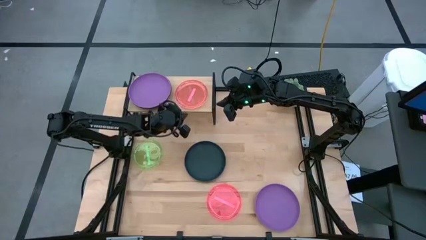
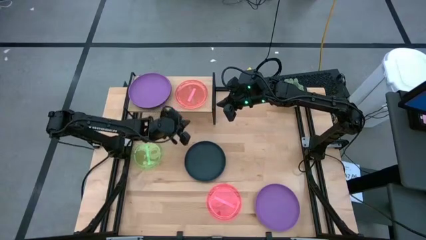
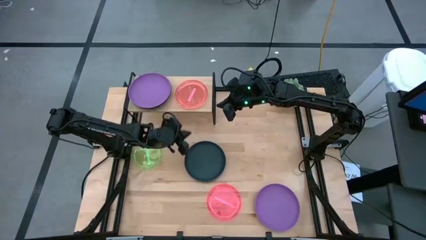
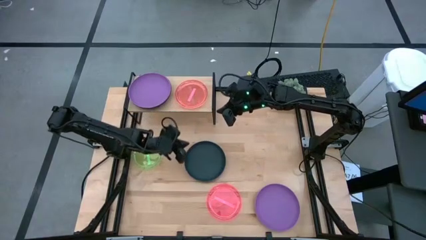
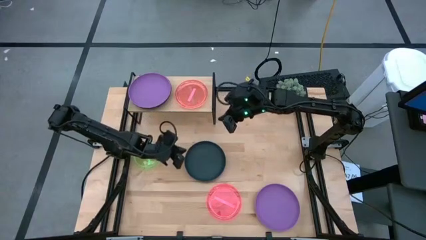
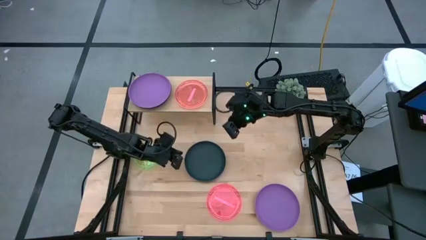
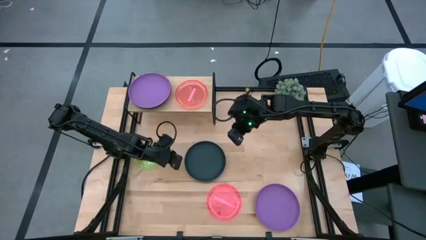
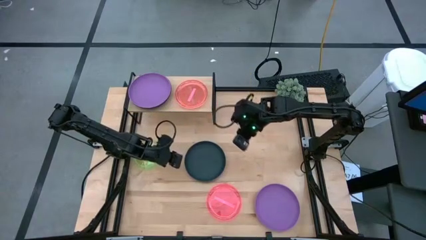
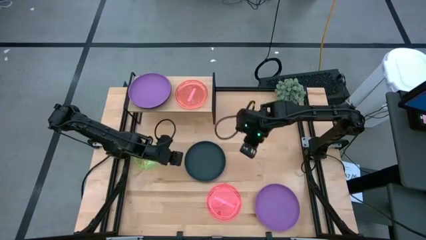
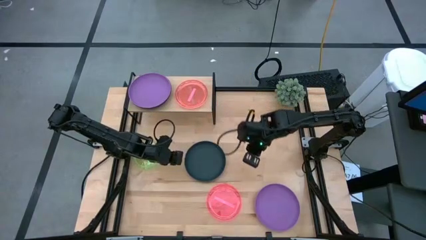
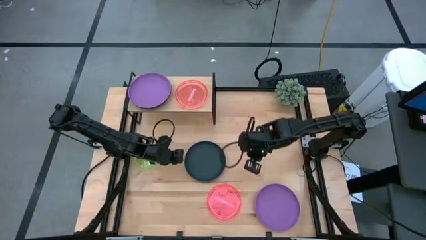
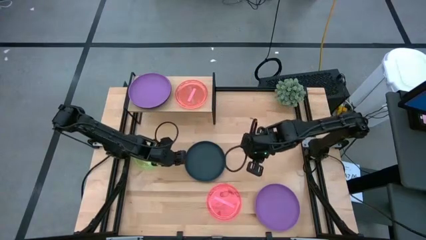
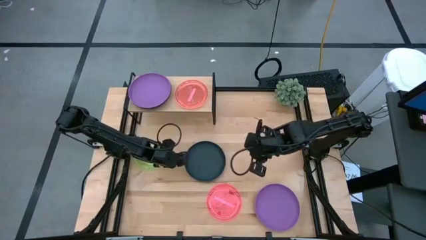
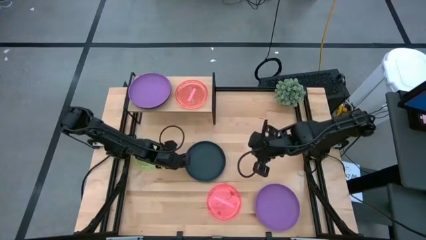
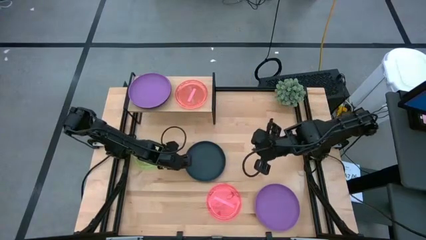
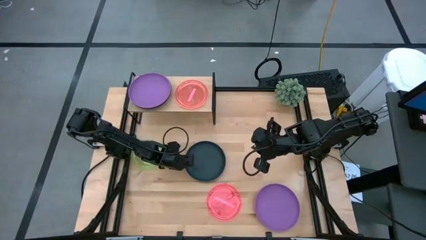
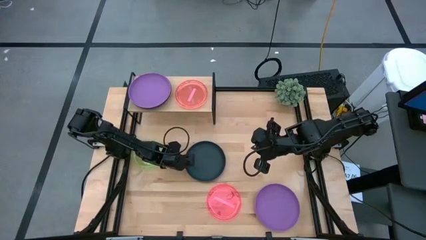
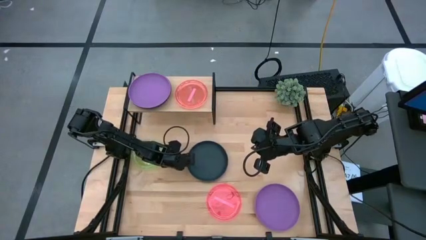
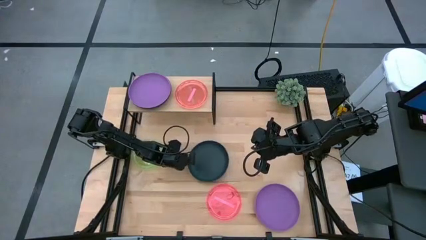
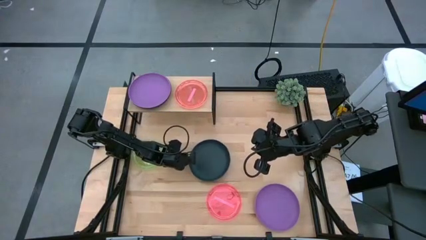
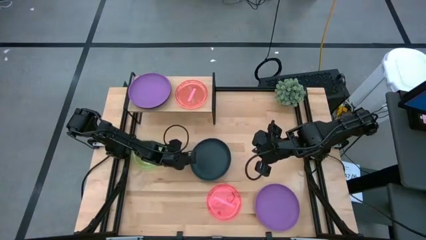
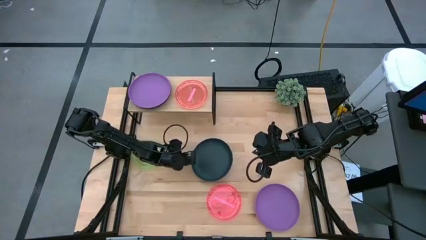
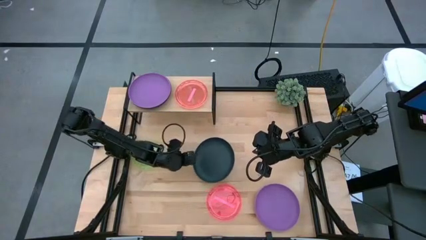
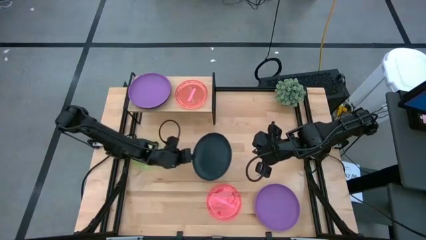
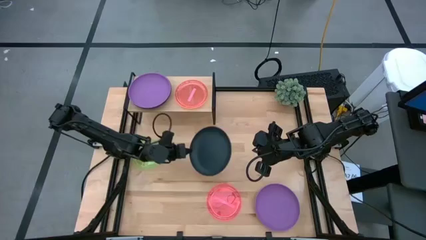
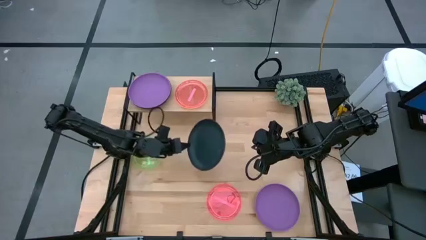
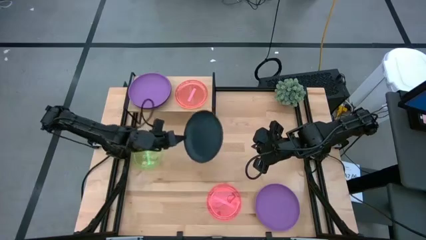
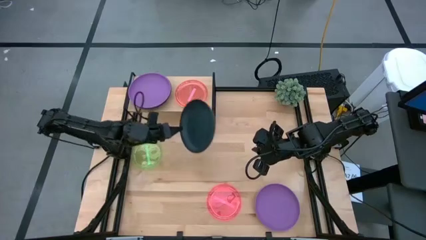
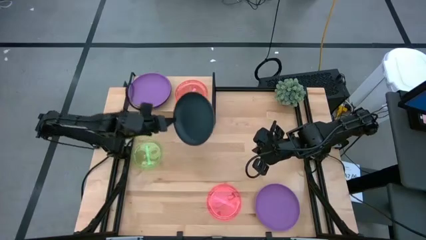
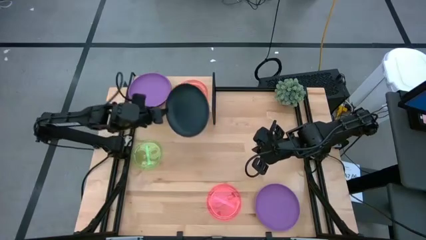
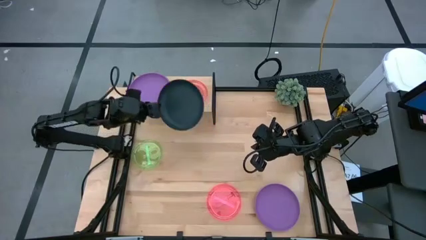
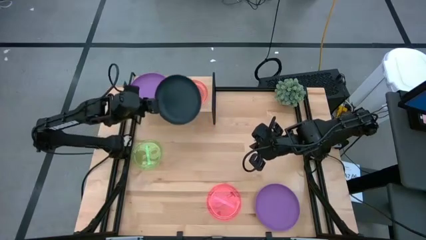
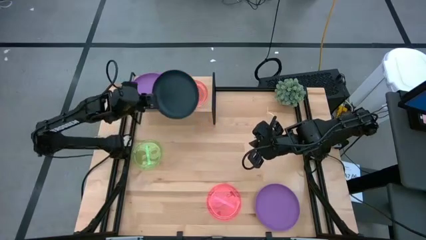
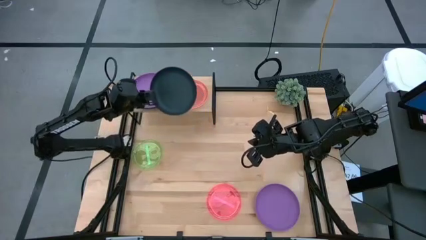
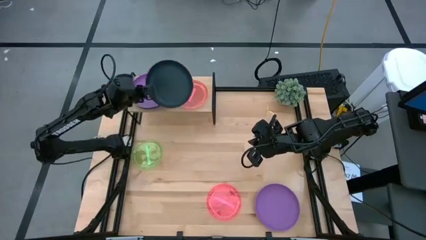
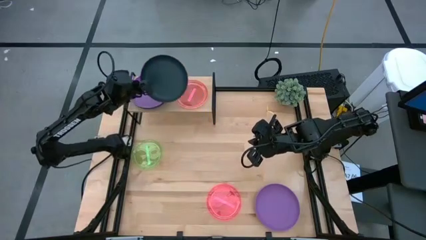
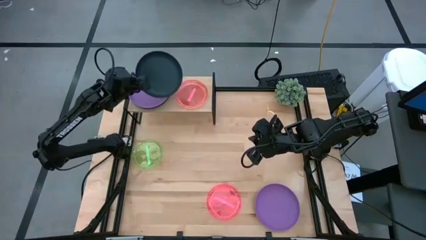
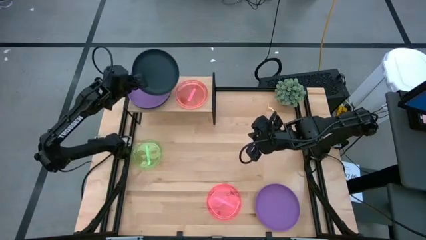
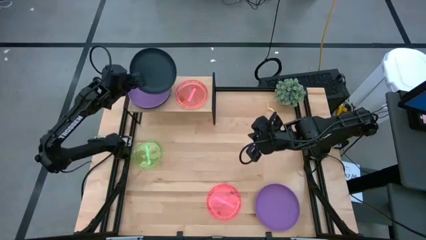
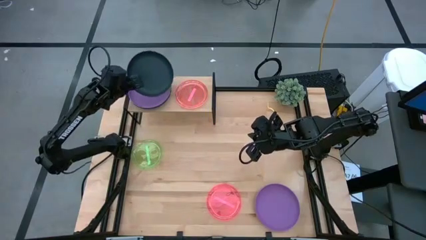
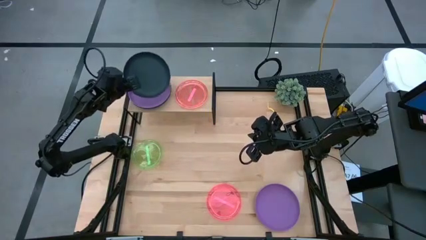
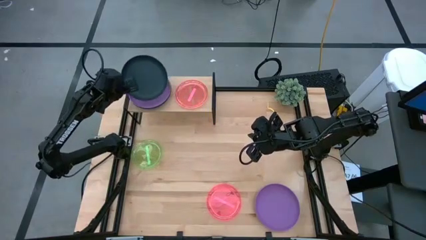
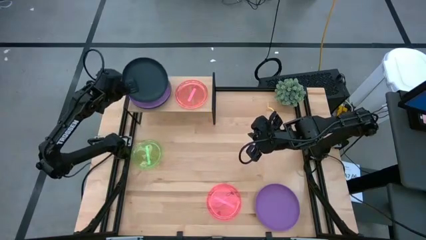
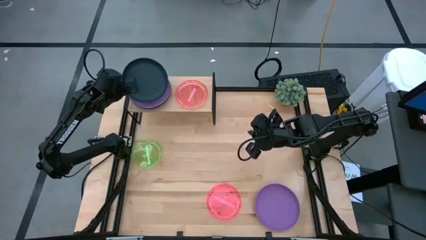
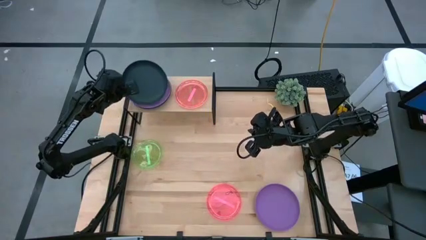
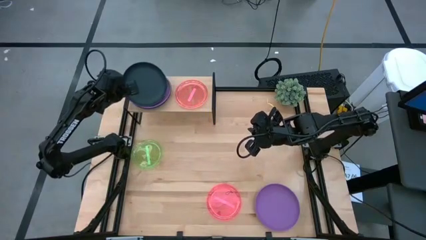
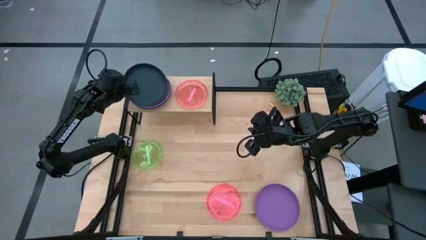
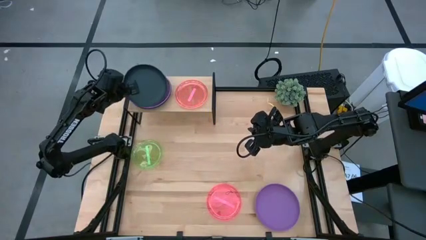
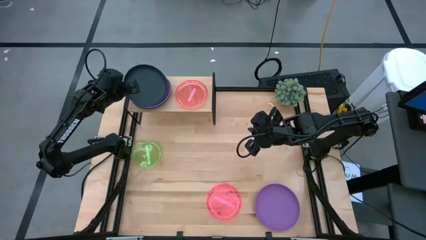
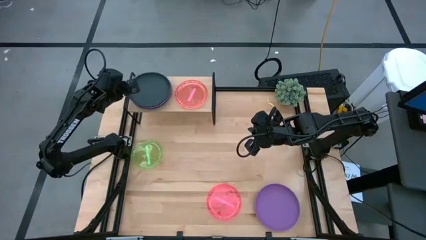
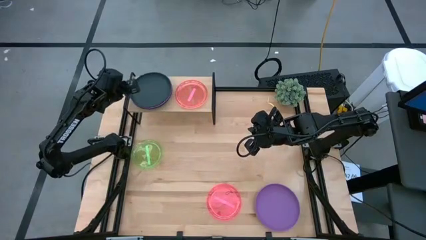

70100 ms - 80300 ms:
Task: Place and stack plates onto a shelf
Stack the black plate on the purple plate

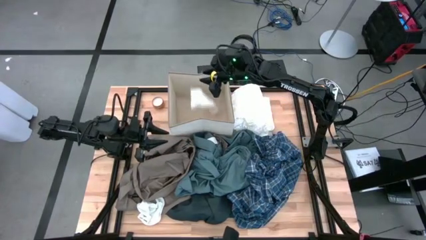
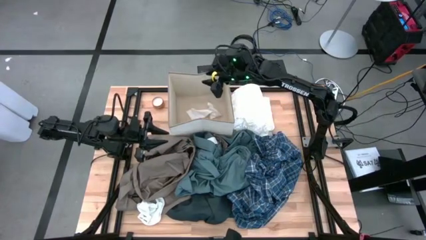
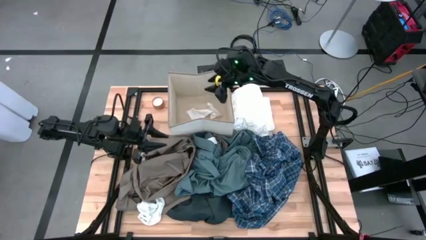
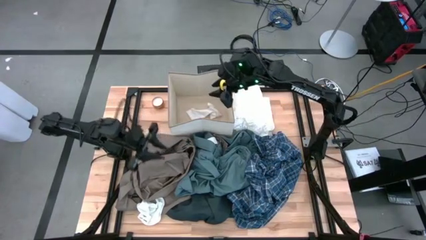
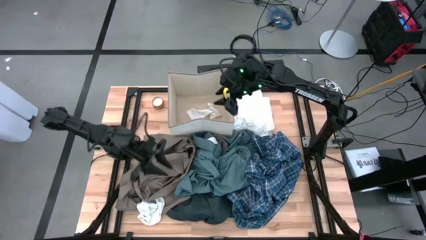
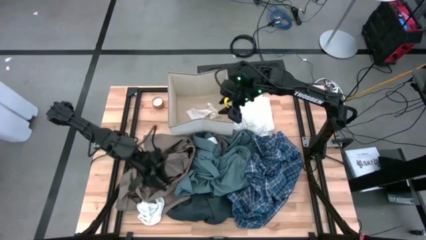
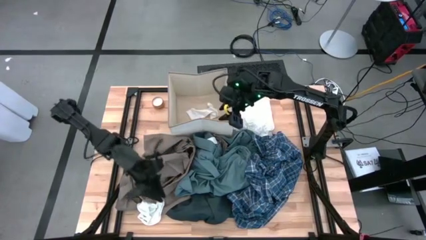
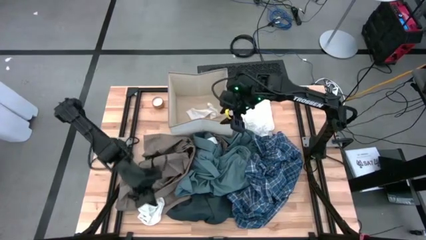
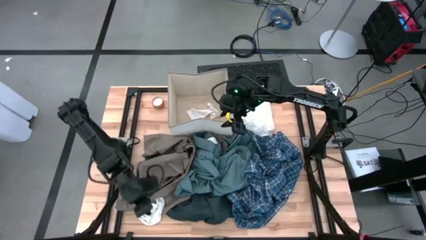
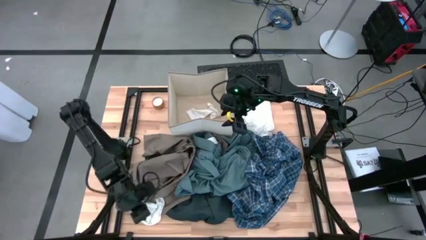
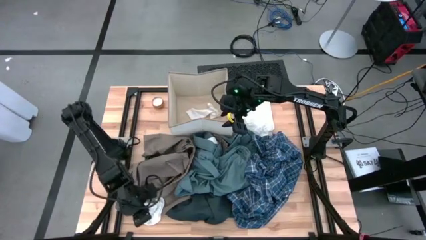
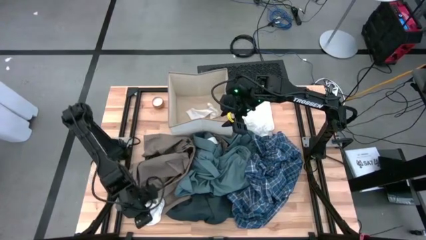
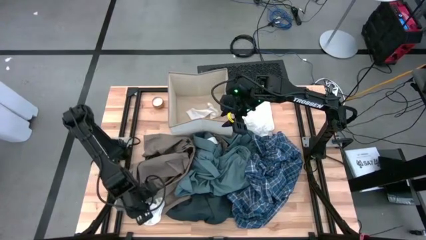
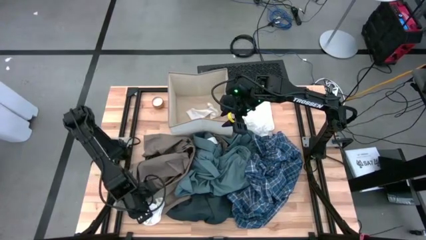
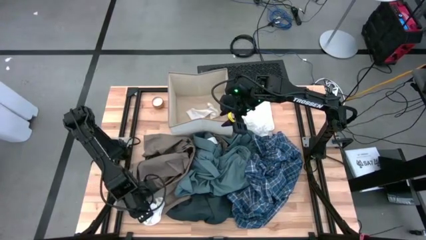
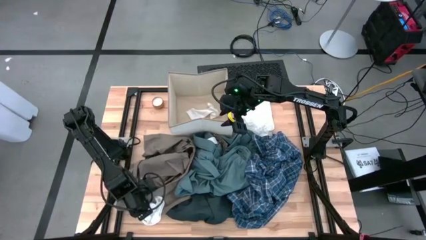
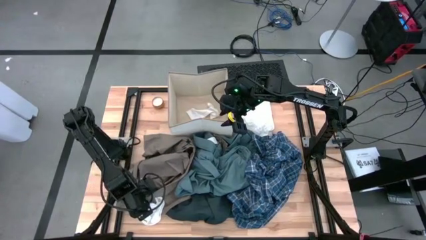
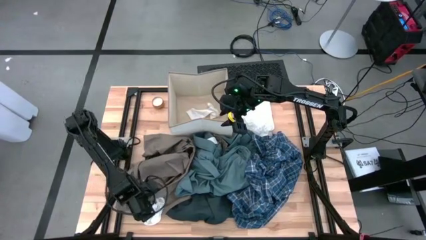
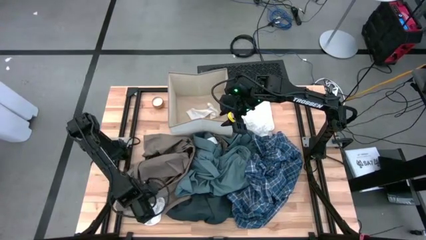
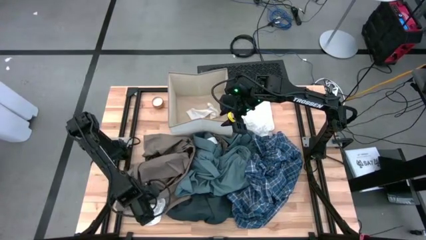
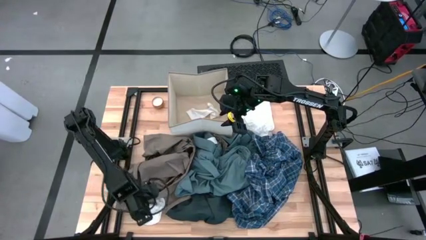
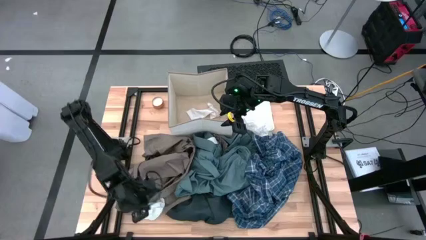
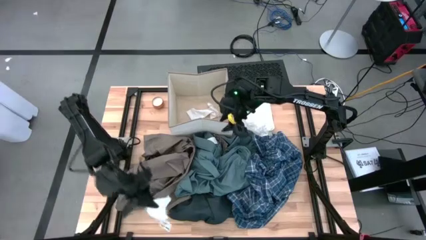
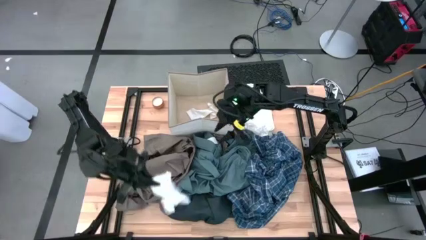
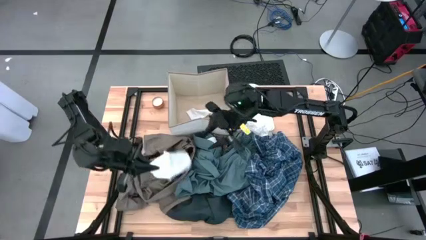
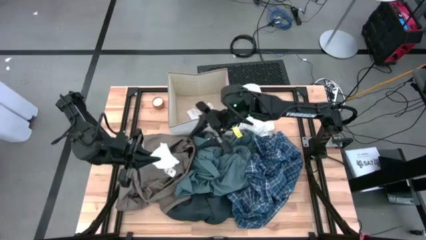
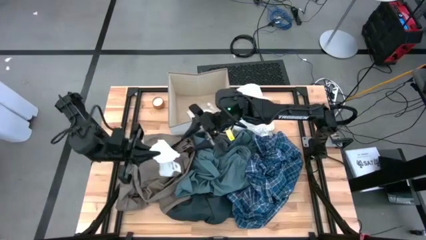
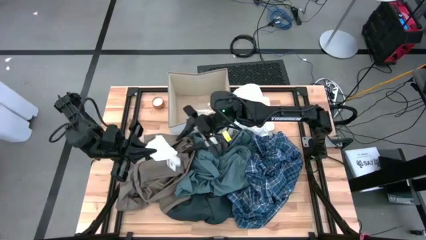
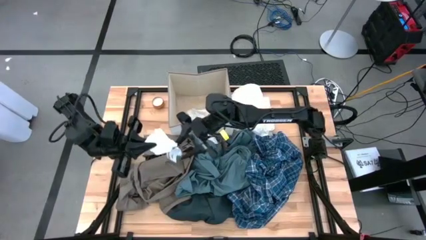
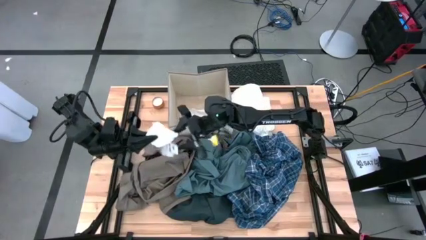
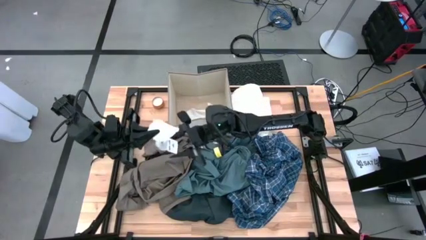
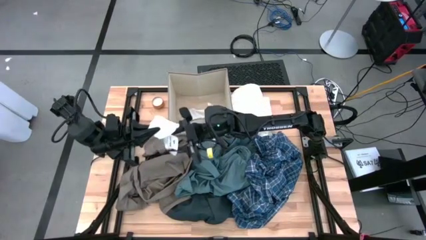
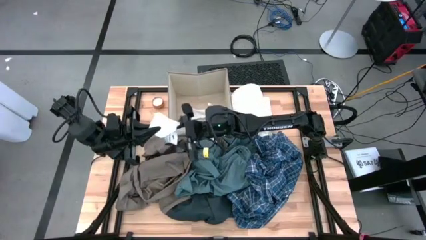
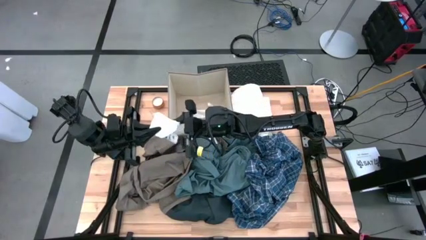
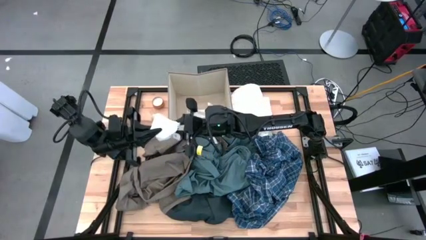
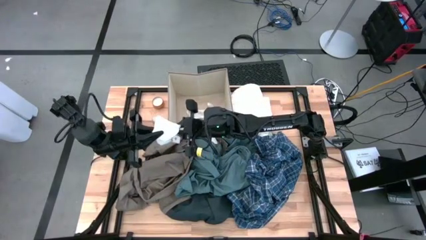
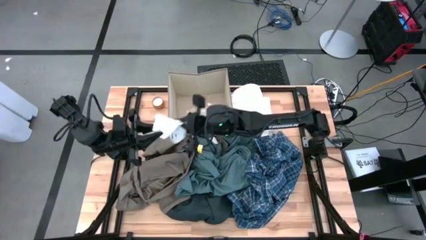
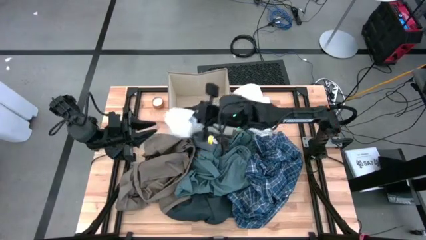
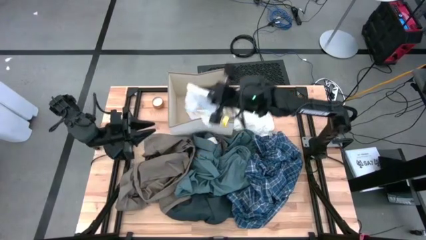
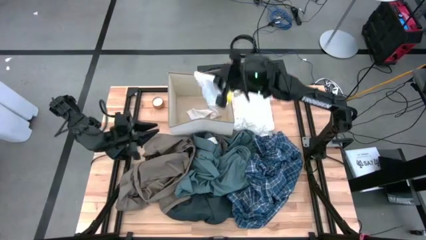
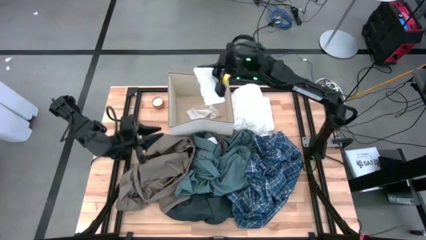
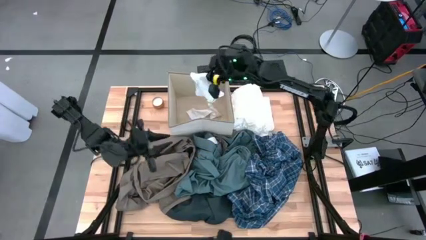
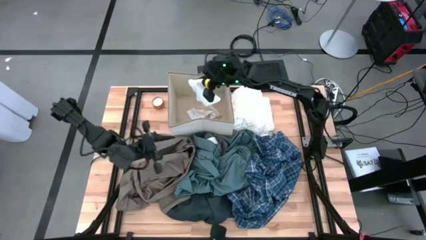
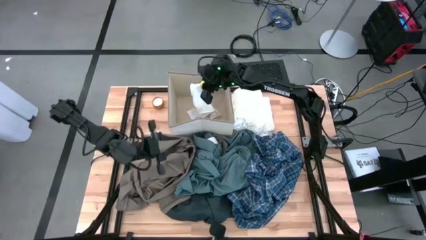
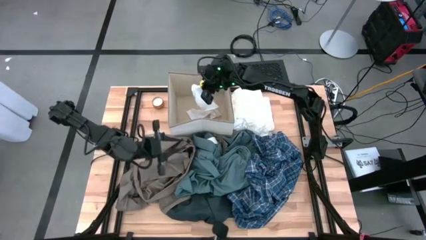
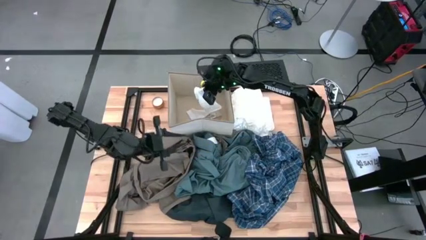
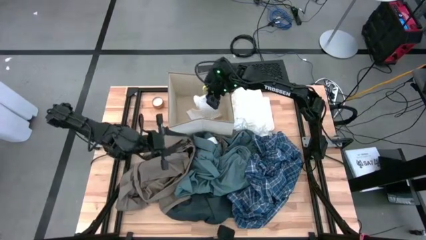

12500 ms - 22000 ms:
Task: Sort clothes
Put the white sock into the laundry bin
